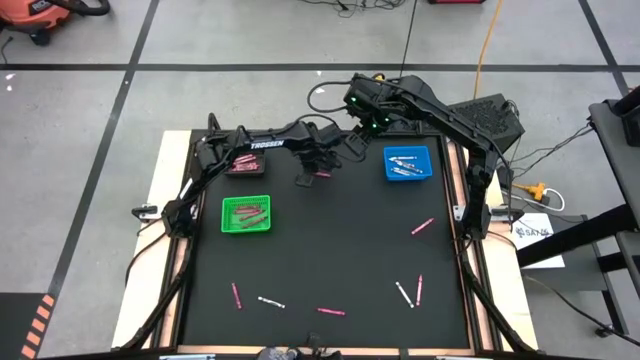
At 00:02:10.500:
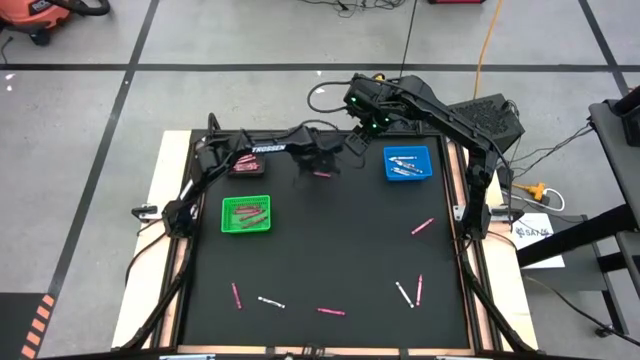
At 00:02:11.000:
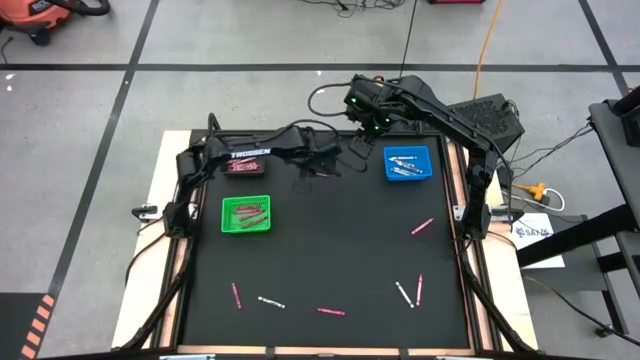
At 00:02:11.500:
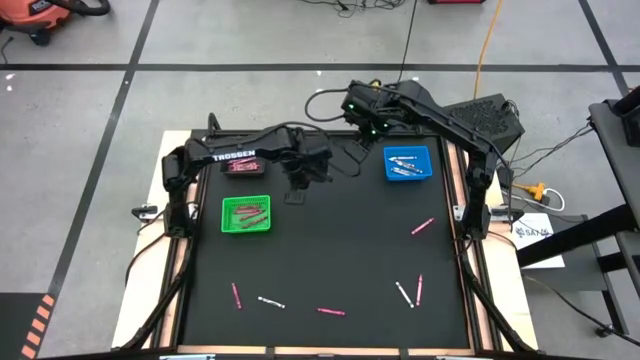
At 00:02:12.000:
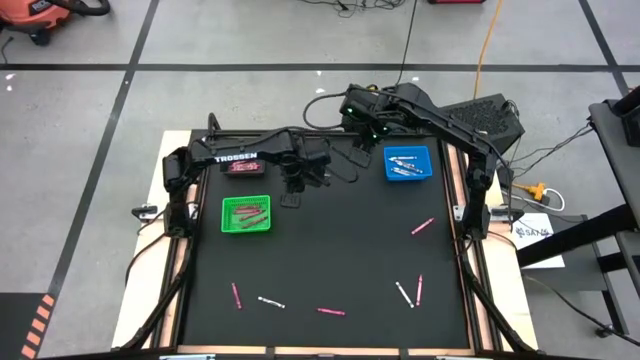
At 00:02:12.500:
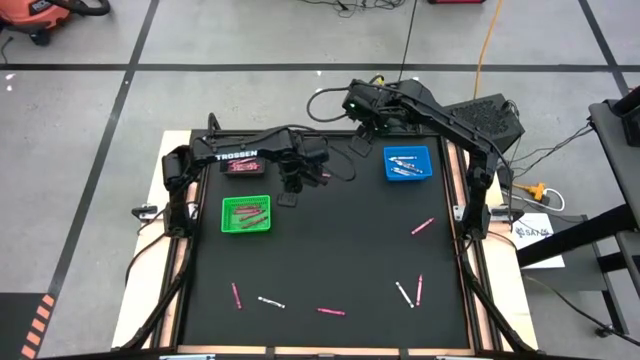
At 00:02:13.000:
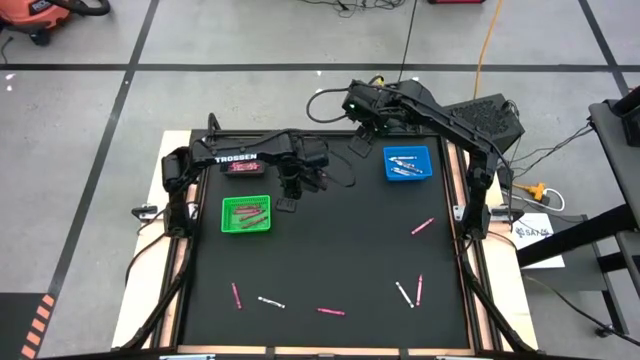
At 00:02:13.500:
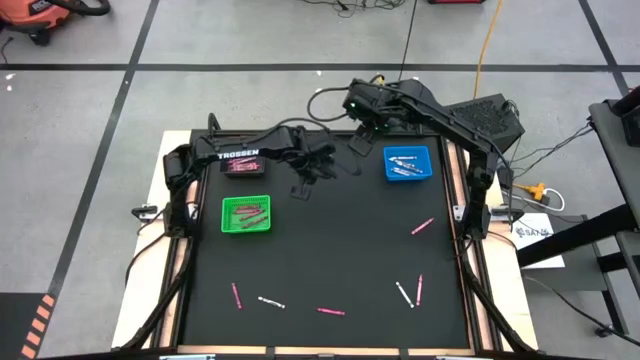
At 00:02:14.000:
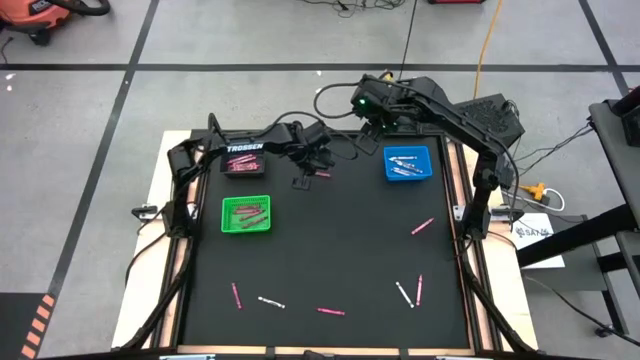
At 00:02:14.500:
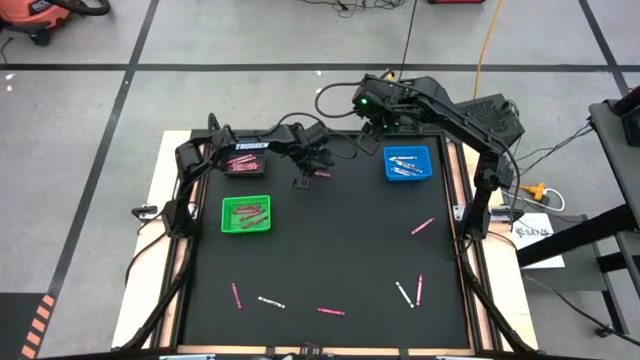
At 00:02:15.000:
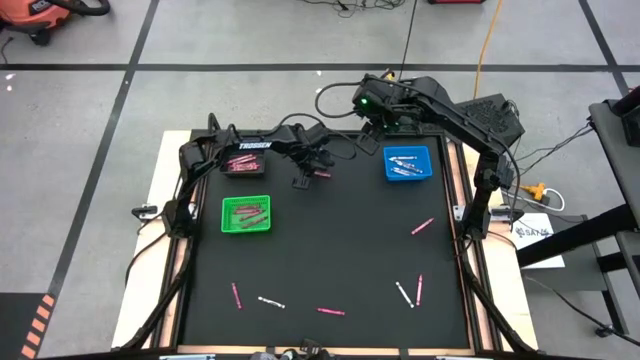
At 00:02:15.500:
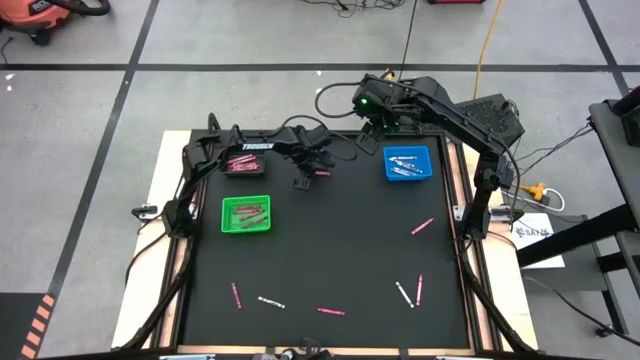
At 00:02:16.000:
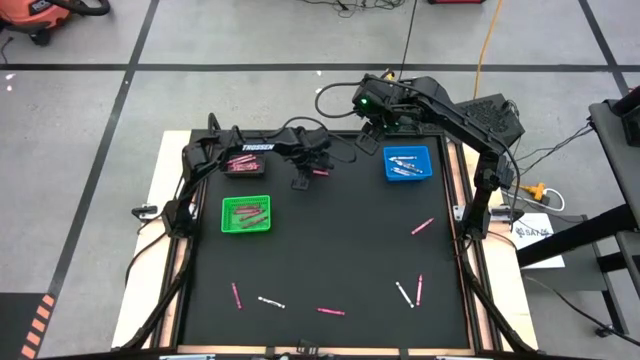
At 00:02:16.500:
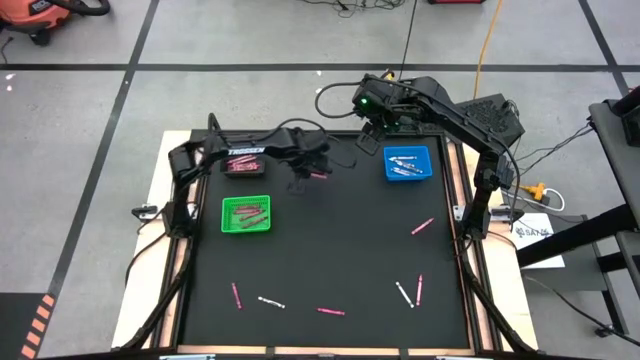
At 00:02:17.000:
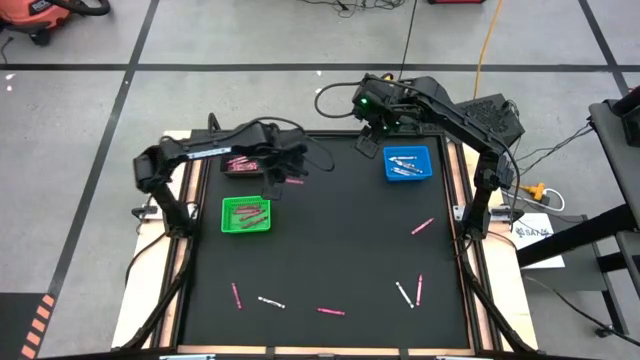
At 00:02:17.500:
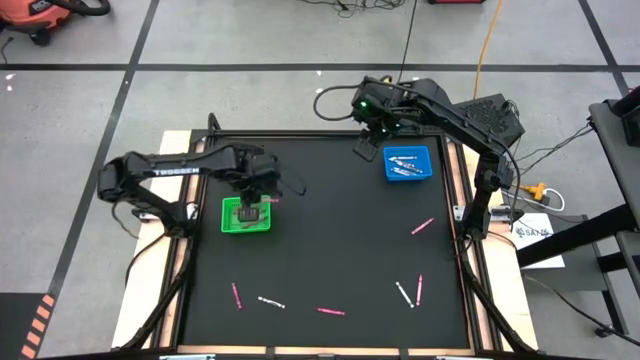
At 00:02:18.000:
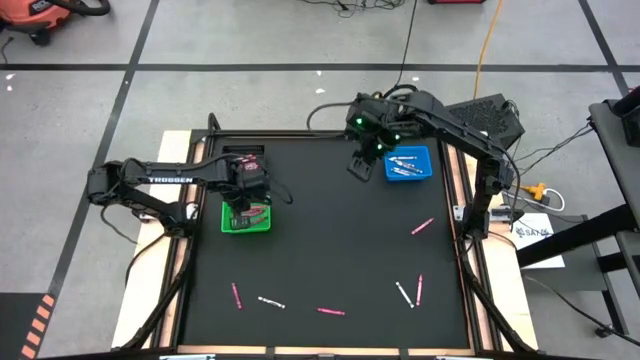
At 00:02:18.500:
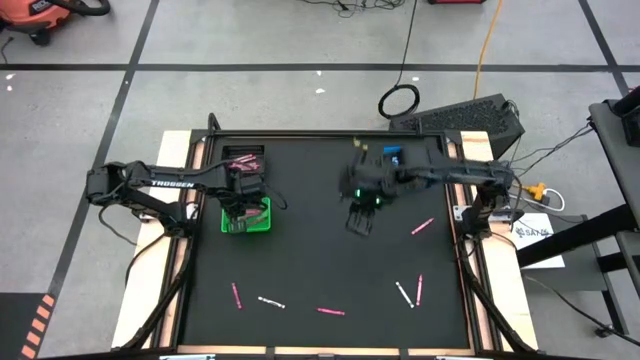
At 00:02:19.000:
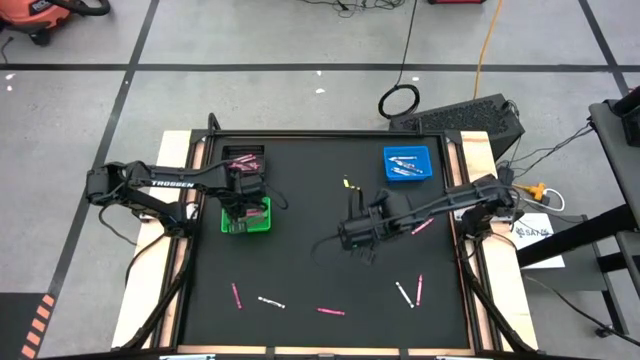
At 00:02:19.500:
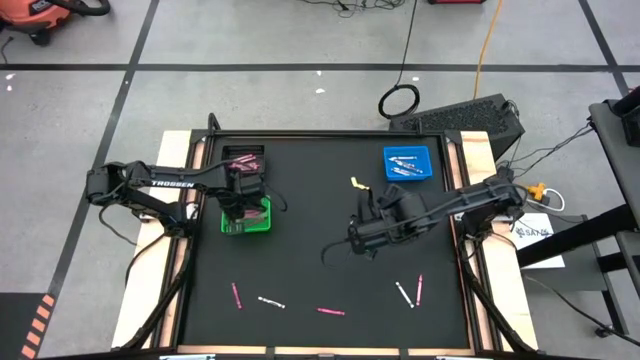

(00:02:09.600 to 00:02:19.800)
Task: Sort crayons
Put the red crayon into the green bin

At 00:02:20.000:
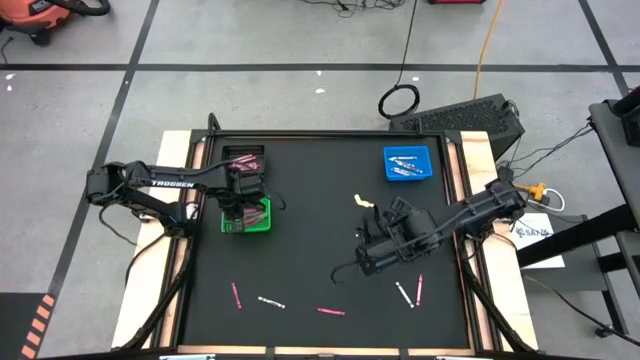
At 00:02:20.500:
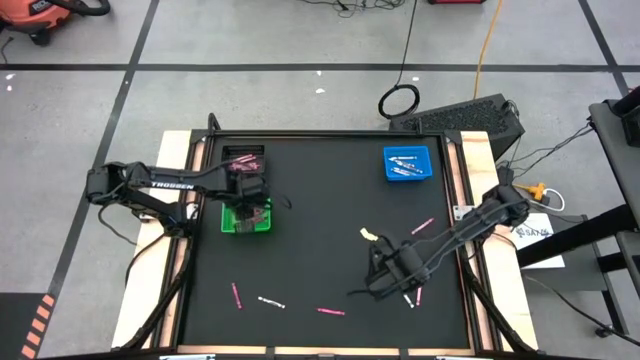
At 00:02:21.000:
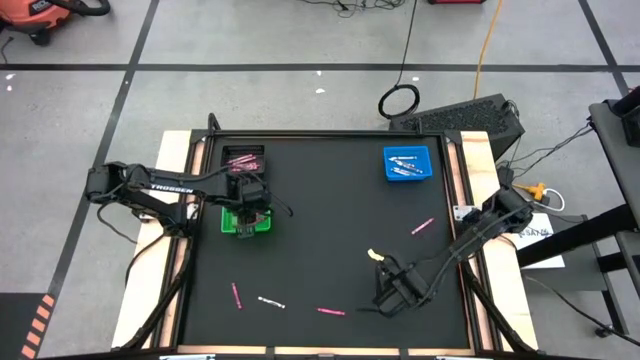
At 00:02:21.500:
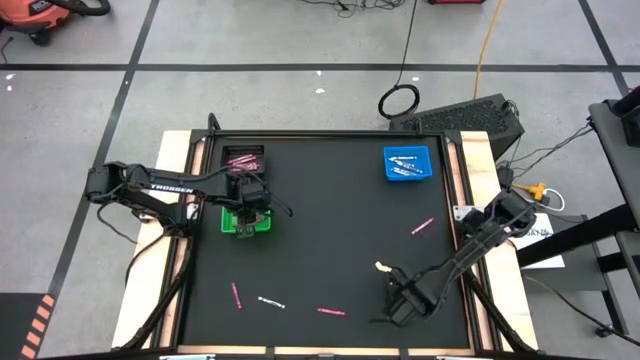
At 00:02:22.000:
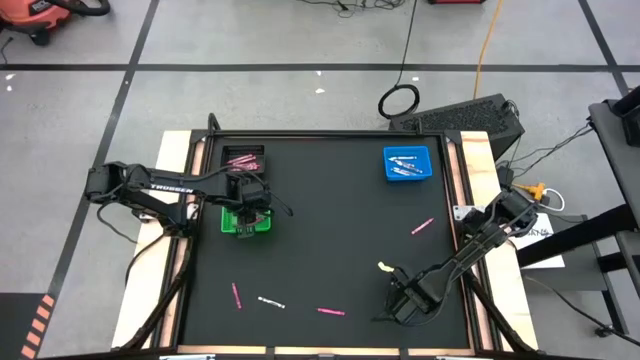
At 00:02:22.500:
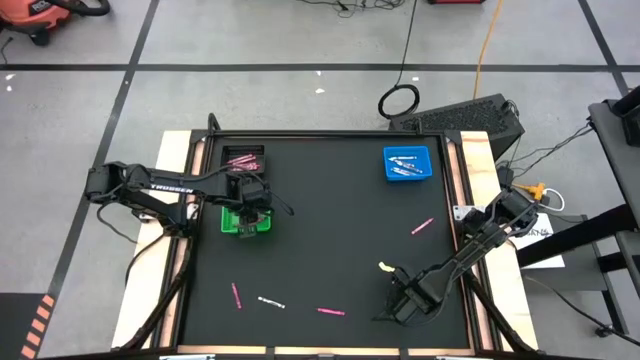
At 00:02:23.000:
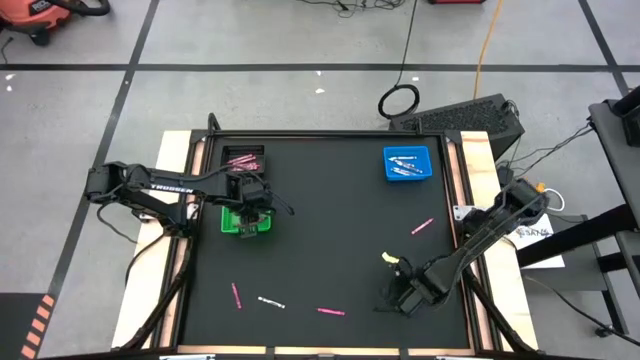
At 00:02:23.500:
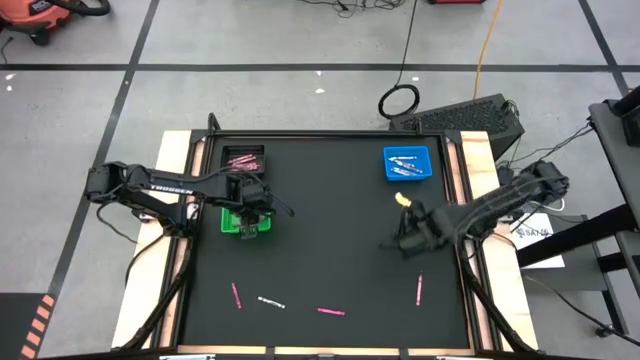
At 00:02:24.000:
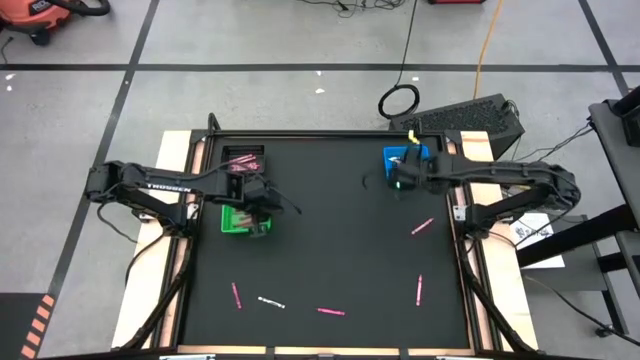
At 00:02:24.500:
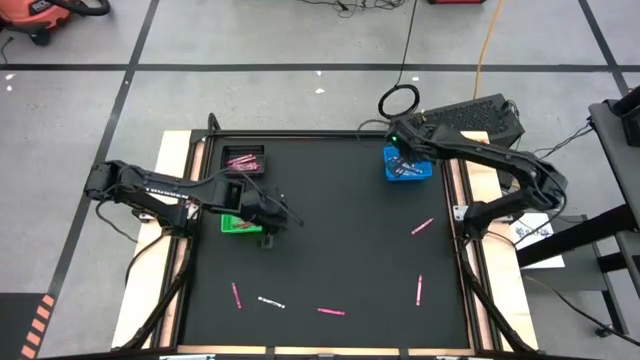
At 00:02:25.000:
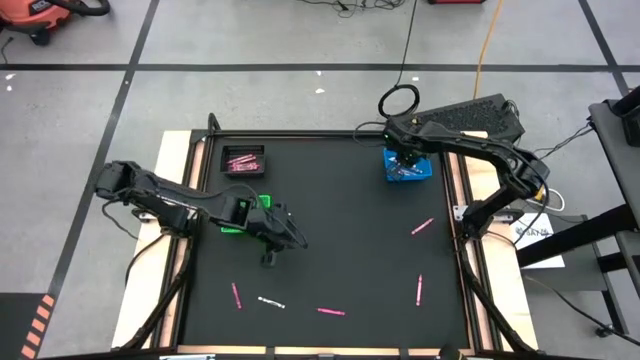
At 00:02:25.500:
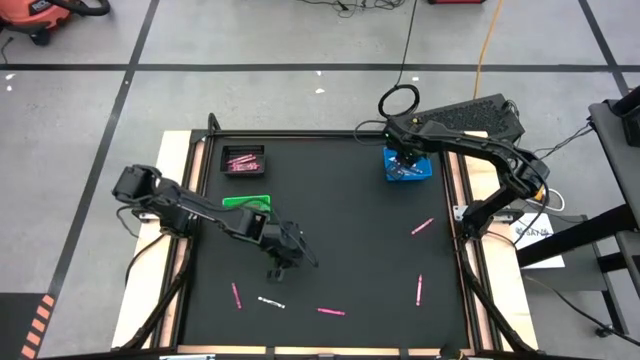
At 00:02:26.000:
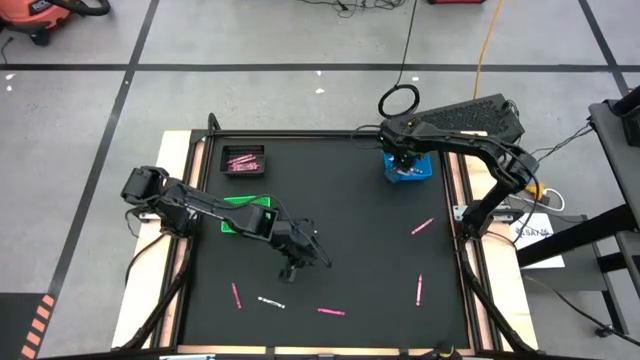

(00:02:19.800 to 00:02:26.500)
Put the white crayon into the blue bin

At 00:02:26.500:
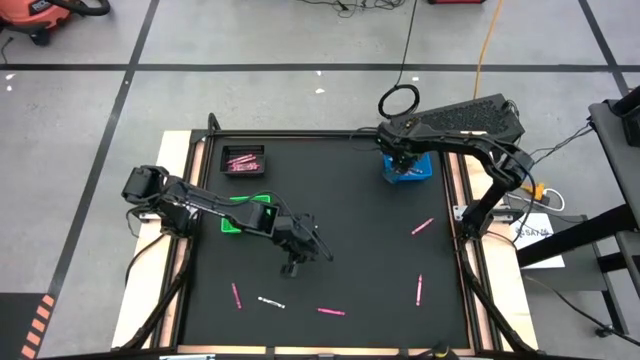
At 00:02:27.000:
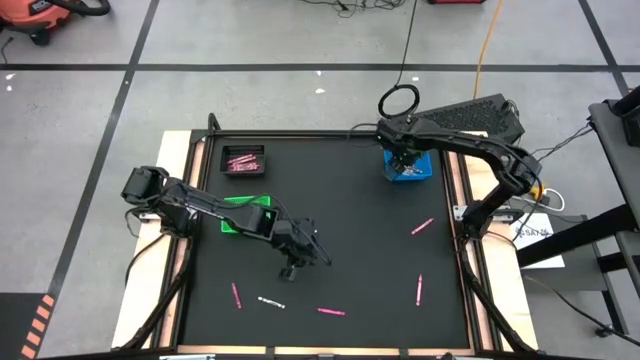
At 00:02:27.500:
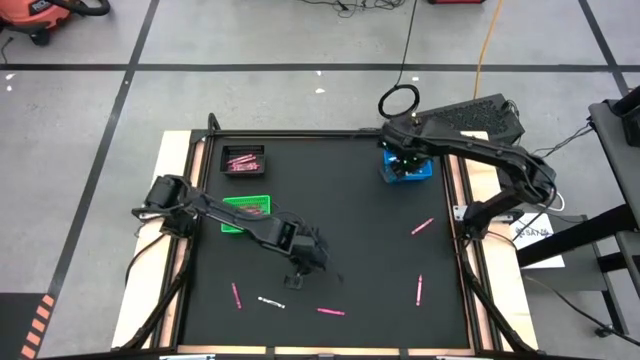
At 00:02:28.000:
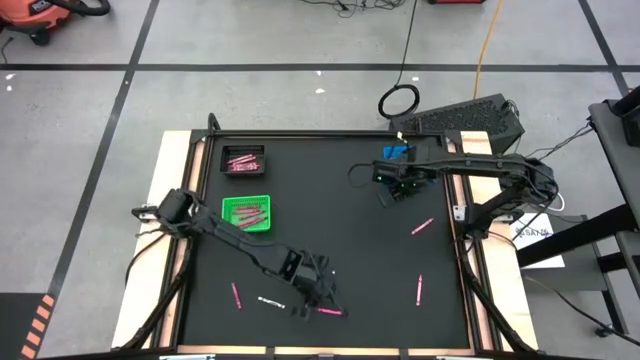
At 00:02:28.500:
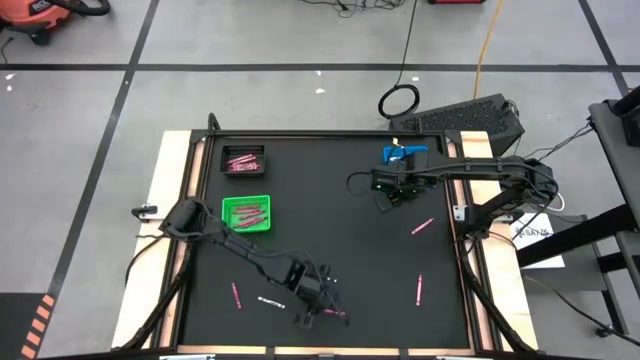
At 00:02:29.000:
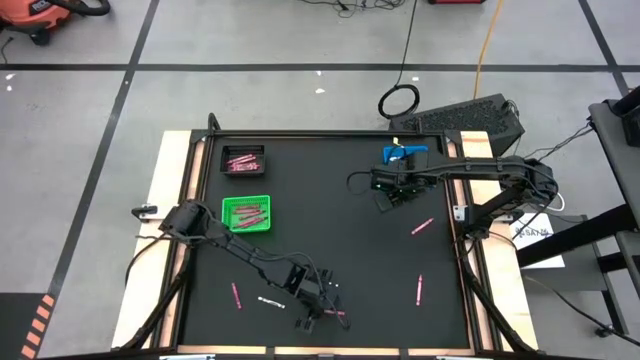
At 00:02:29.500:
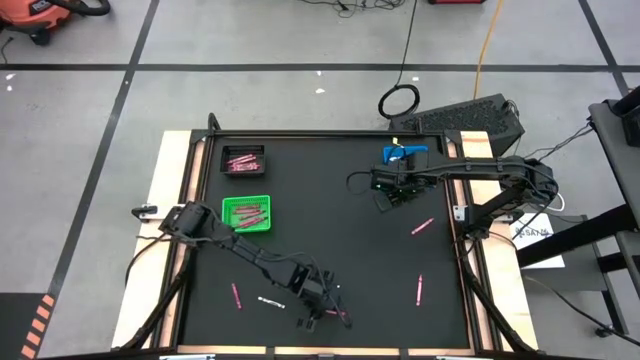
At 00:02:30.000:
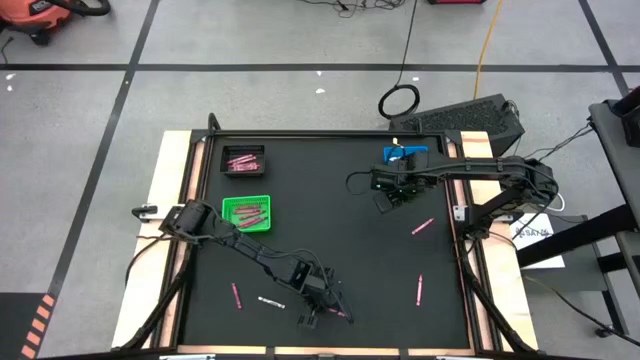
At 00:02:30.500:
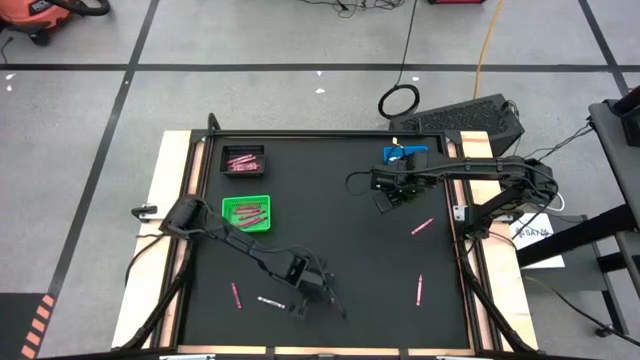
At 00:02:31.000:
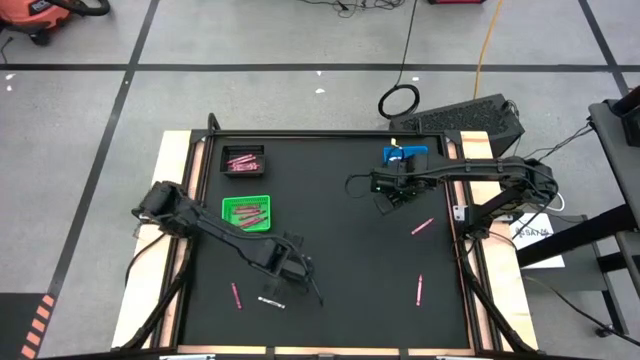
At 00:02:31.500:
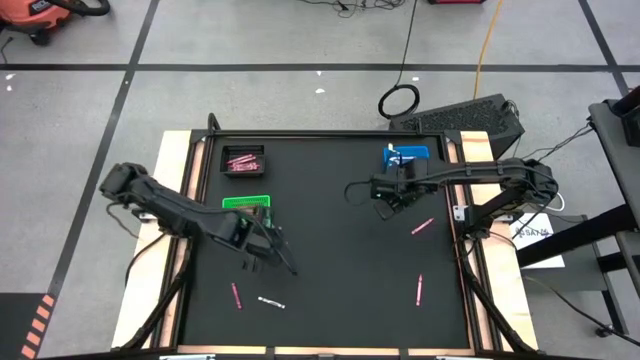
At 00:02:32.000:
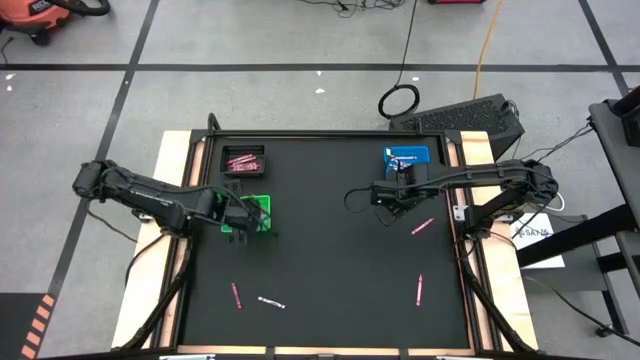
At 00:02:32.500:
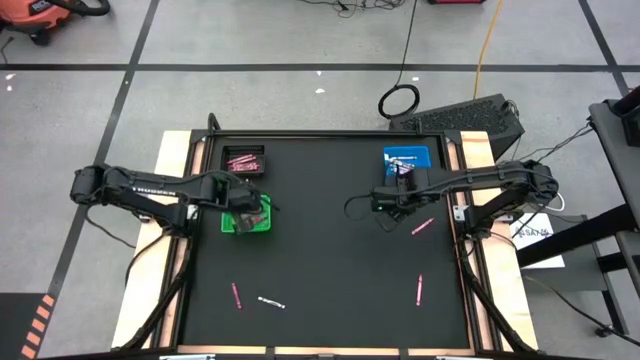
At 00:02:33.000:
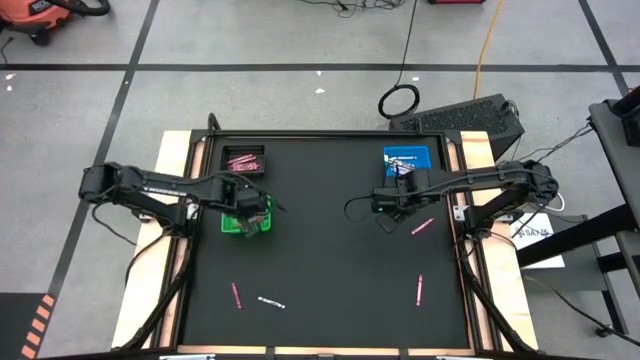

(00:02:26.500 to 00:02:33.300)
Put the red crayon into the green bin
